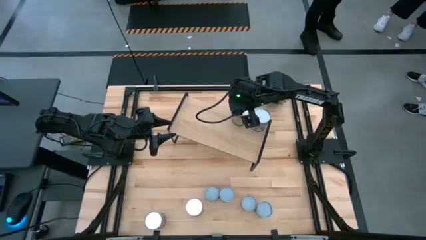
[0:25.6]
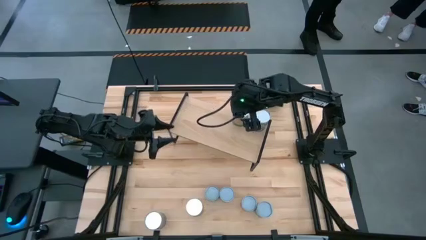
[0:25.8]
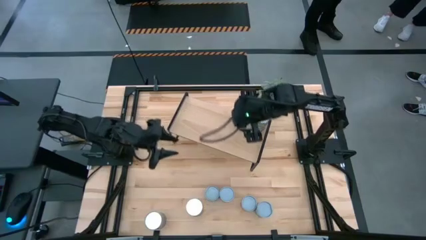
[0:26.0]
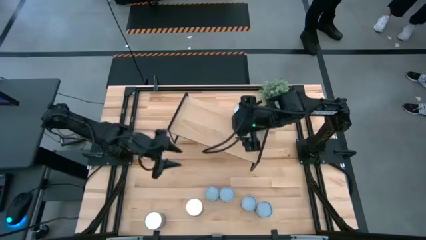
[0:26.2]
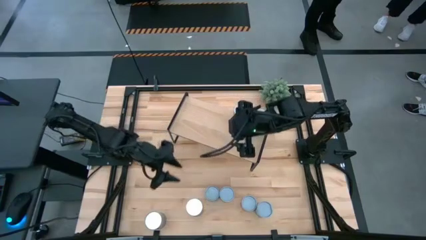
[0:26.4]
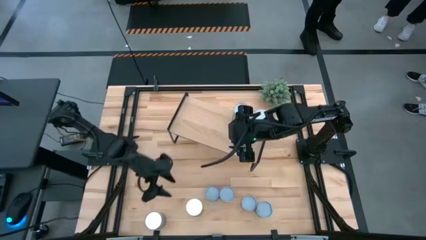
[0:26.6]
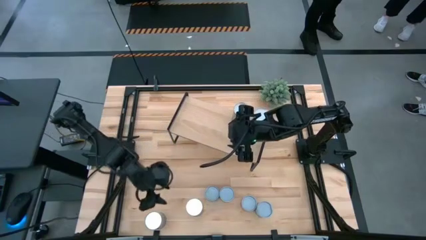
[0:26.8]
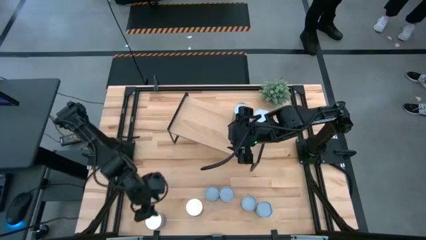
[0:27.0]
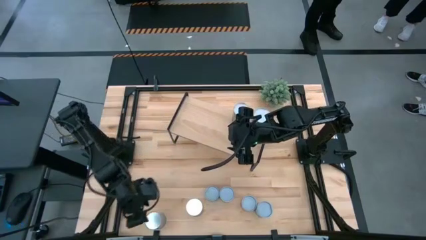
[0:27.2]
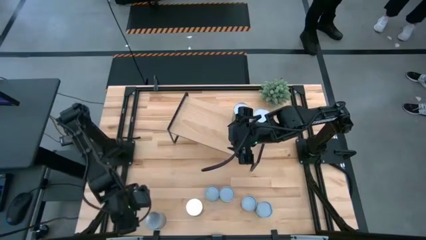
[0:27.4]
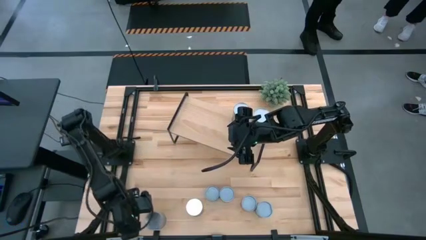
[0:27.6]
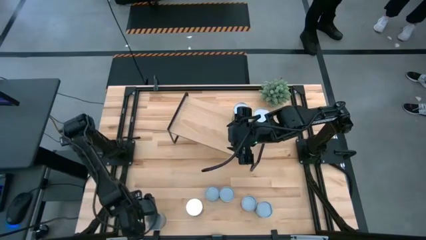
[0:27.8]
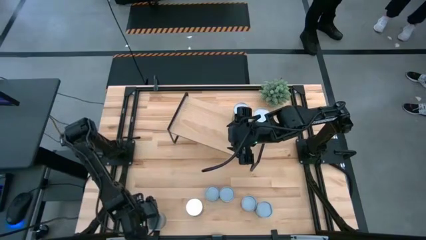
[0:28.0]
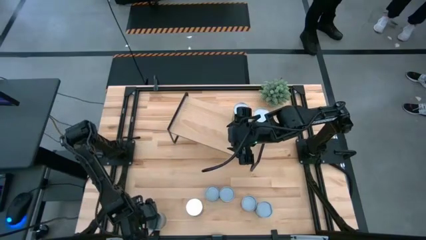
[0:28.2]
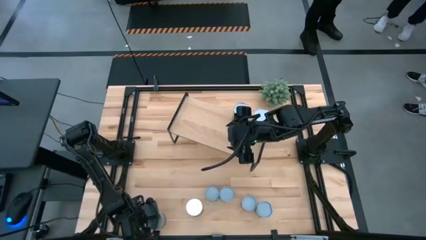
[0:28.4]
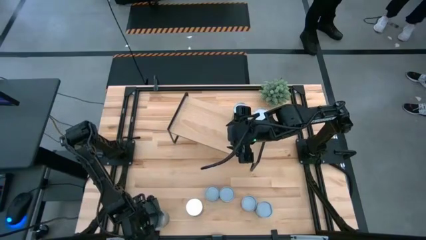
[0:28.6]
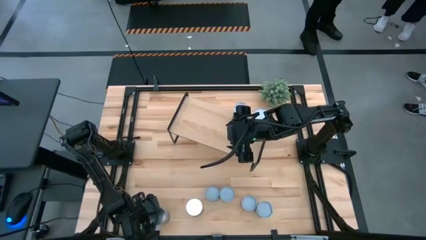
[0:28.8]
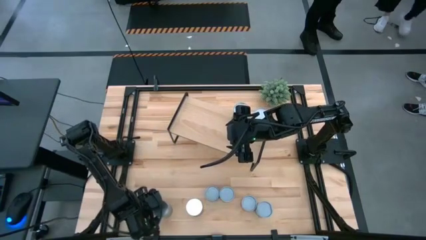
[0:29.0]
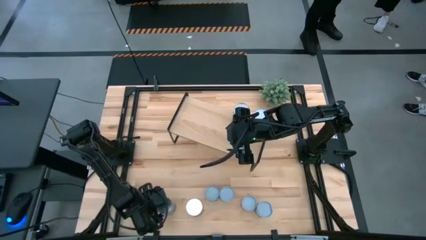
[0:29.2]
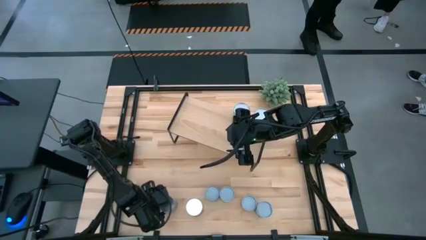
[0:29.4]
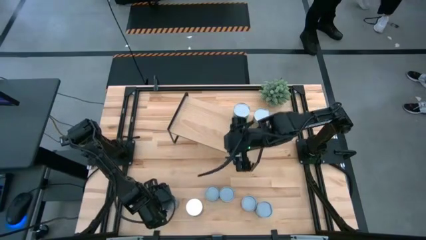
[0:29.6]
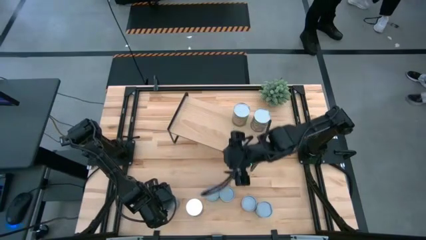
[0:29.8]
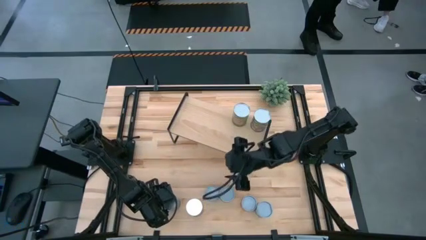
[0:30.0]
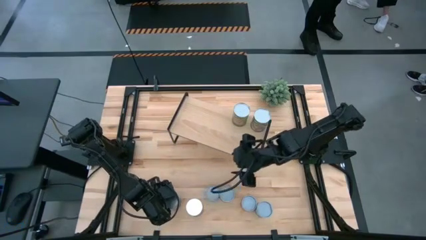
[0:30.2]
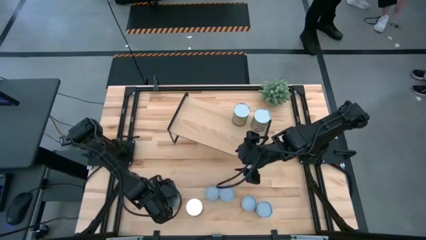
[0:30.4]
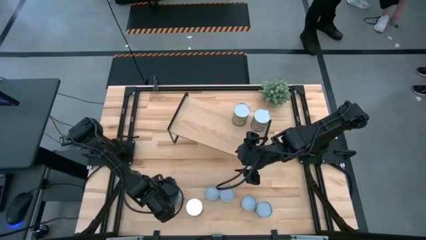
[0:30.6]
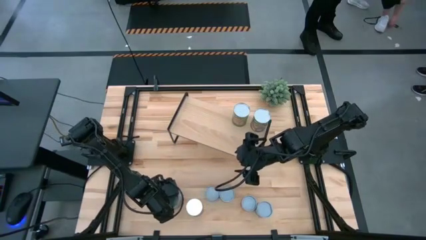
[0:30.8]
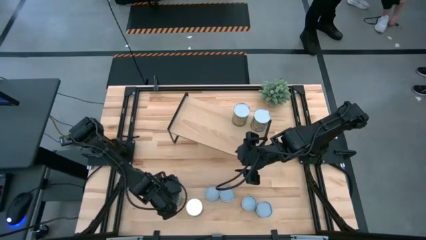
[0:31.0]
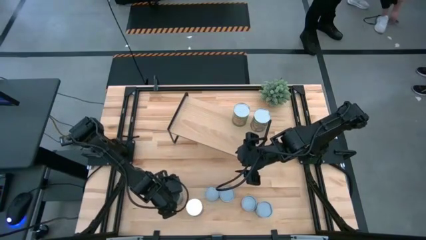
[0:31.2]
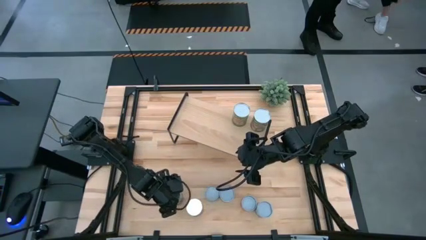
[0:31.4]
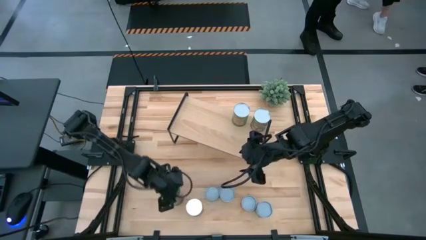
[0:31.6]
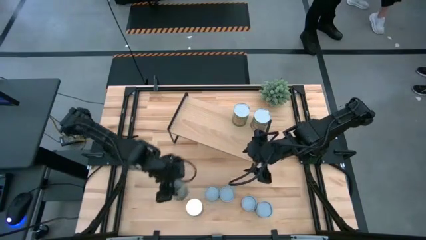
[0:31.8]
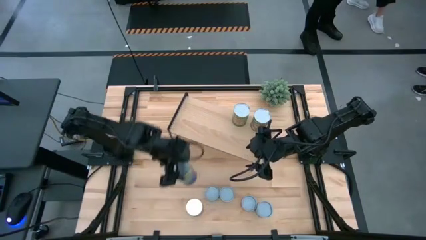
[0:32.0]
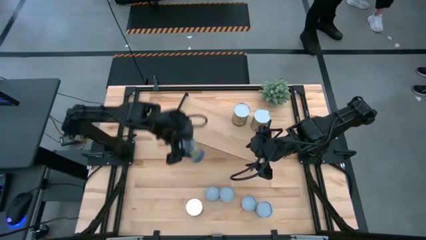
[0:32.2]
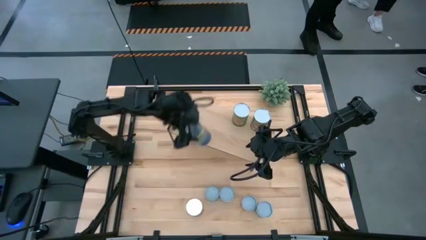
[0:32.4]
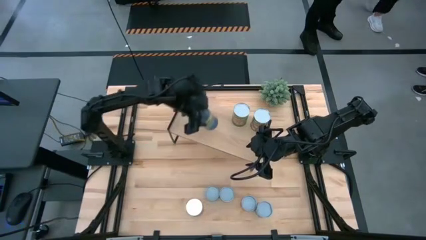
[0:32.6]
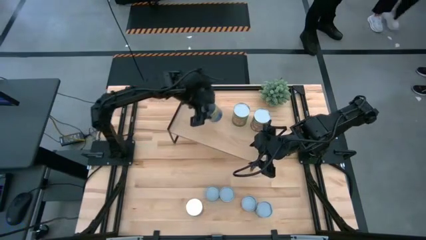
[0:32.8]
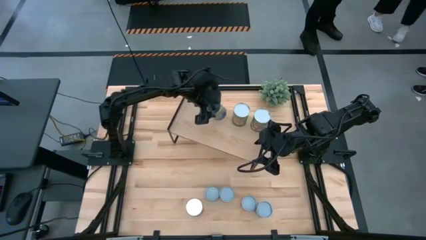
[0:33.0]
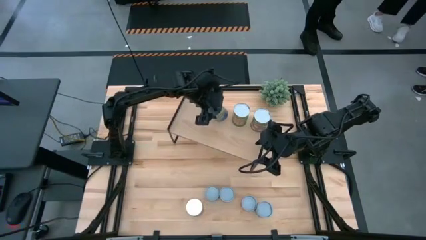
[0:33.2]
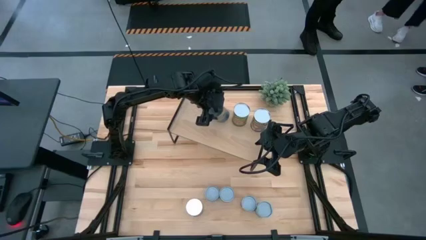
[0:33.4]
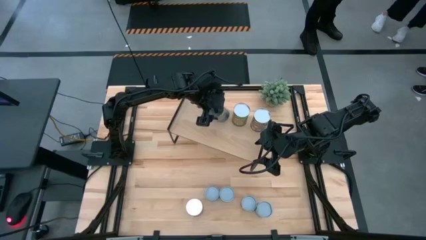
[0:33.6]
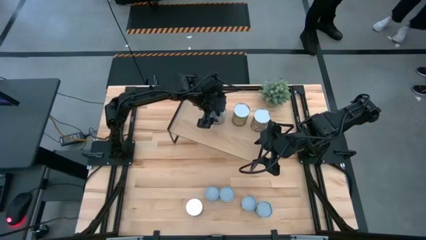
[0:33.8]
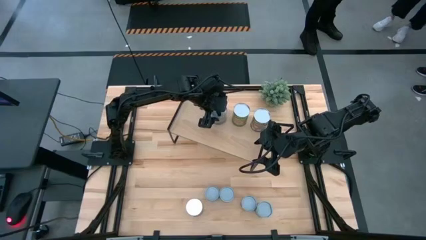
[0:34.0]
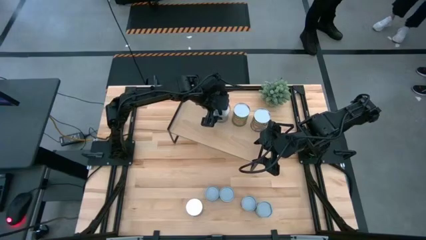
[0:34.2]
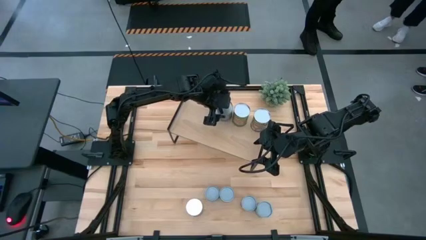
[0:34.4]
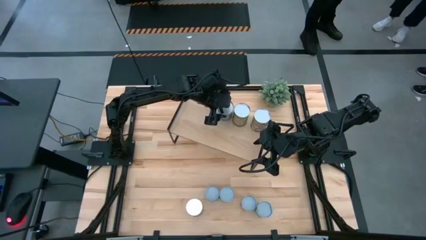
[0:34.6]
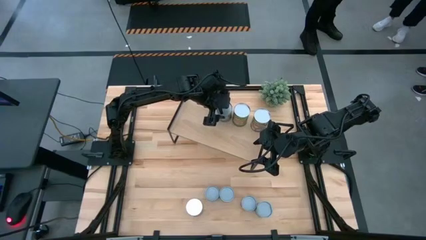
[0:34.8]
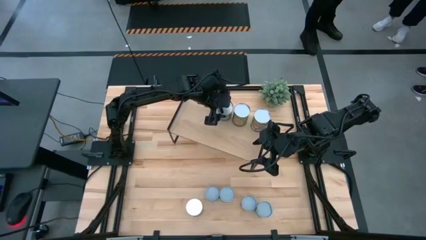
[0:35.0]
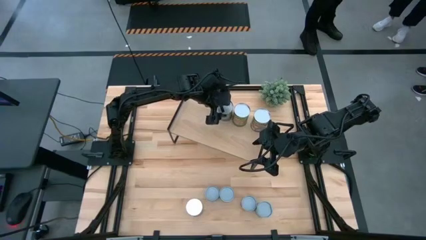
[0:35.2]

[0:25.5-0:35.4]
Task: Pick and place cans onto a shelf
Put the canned peas on the shelf

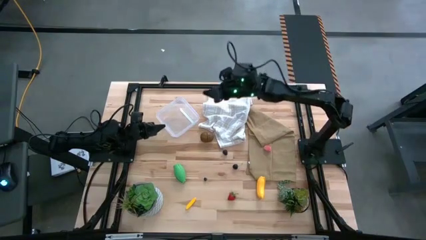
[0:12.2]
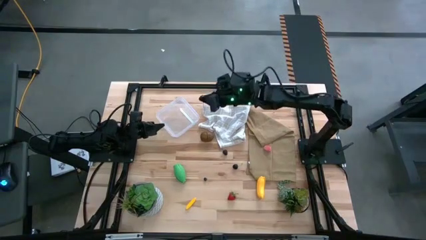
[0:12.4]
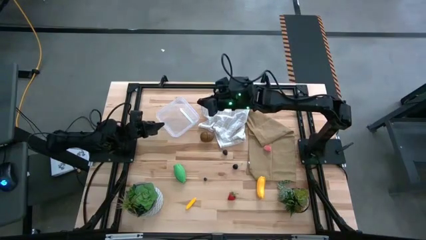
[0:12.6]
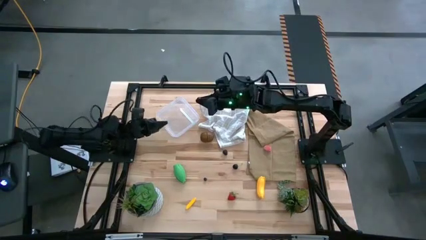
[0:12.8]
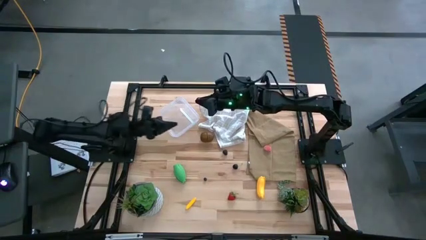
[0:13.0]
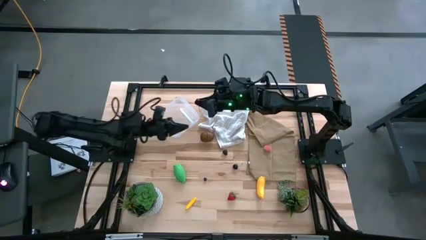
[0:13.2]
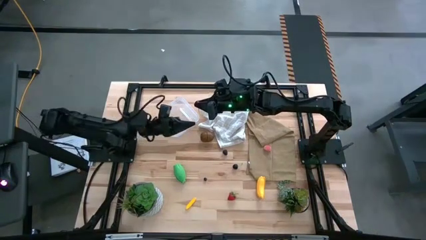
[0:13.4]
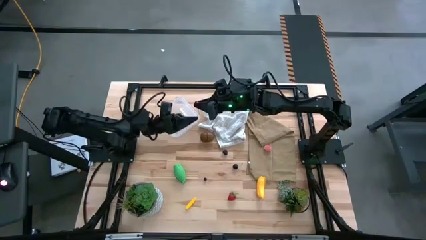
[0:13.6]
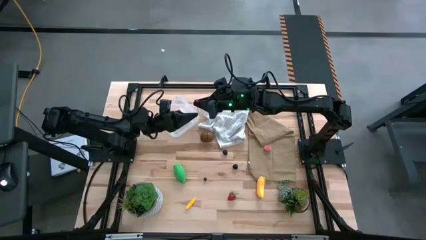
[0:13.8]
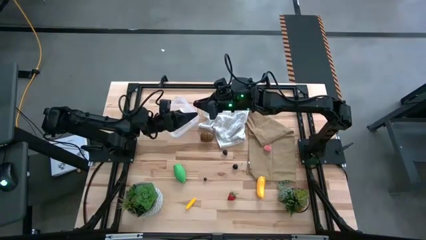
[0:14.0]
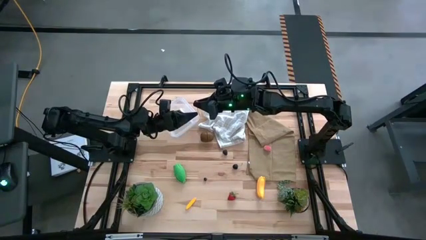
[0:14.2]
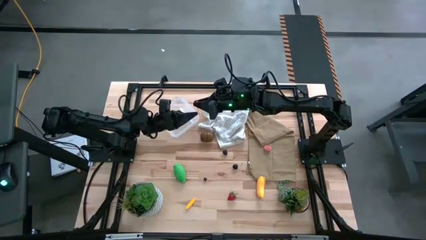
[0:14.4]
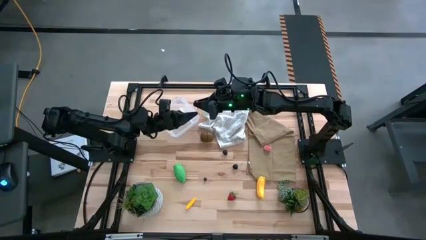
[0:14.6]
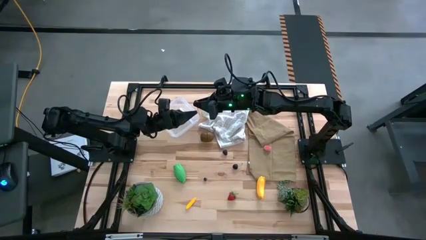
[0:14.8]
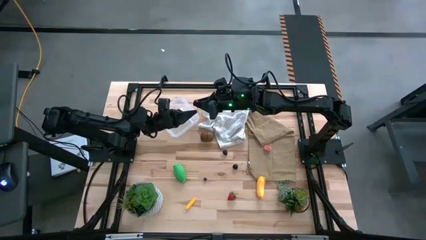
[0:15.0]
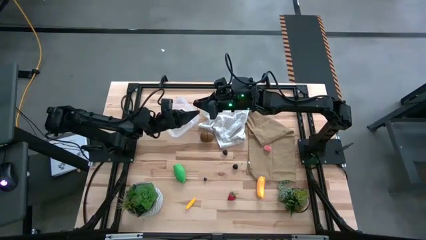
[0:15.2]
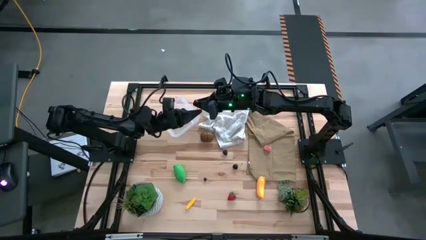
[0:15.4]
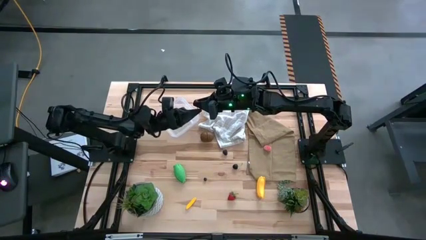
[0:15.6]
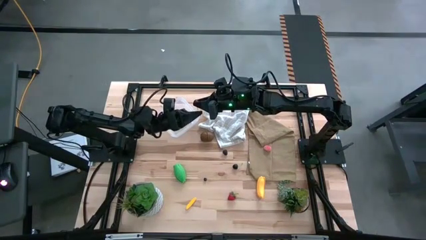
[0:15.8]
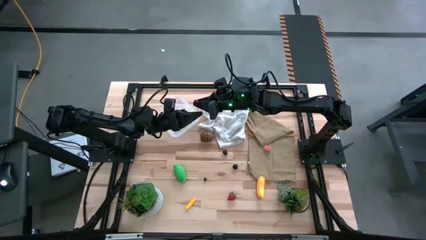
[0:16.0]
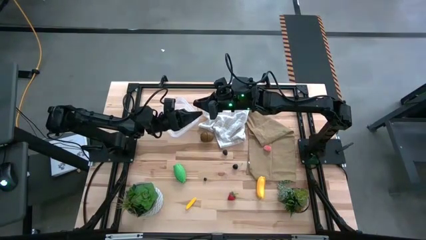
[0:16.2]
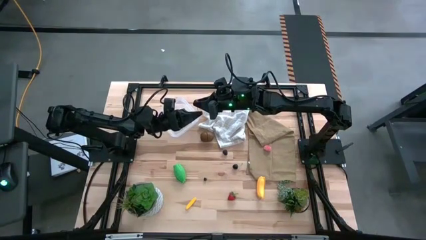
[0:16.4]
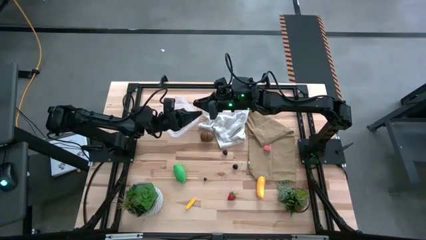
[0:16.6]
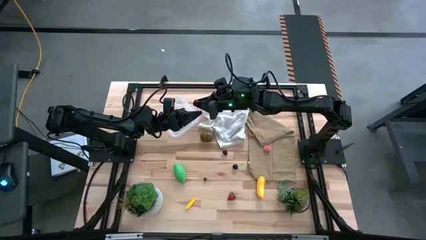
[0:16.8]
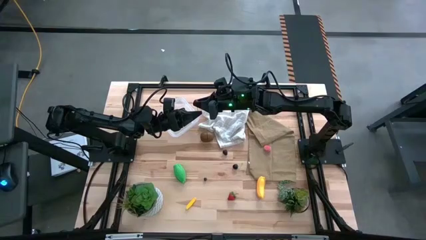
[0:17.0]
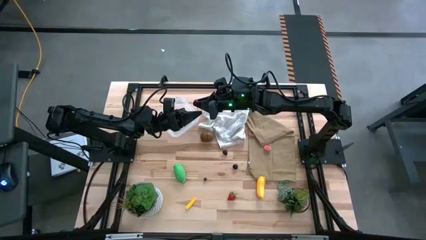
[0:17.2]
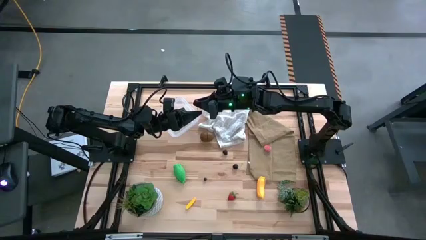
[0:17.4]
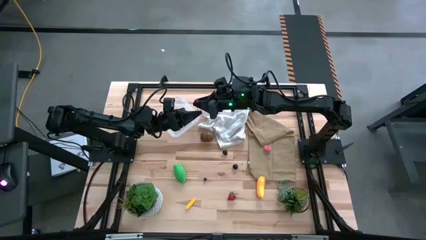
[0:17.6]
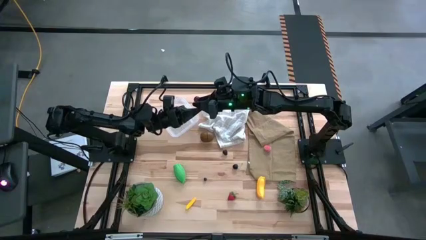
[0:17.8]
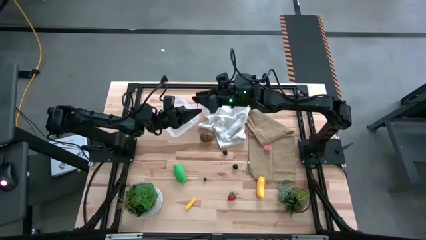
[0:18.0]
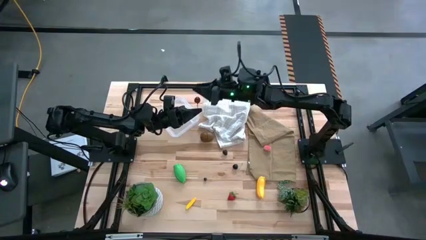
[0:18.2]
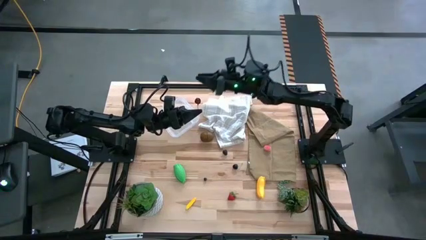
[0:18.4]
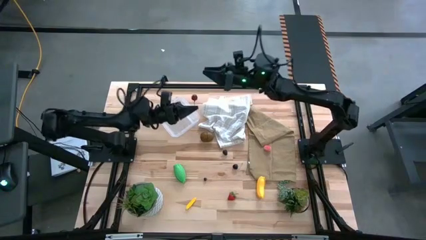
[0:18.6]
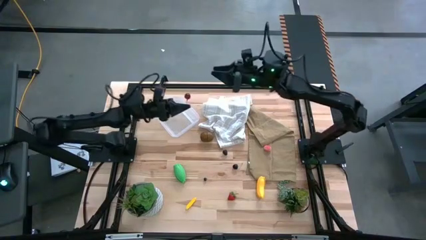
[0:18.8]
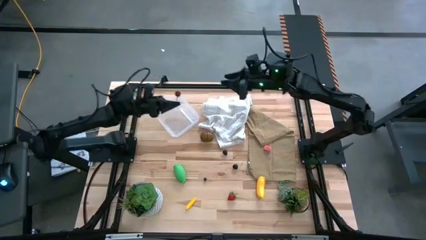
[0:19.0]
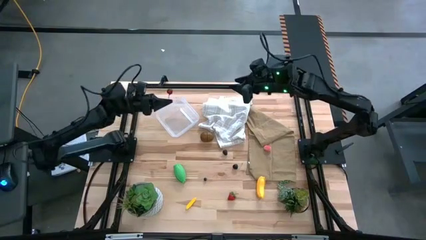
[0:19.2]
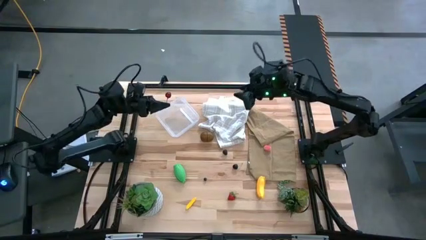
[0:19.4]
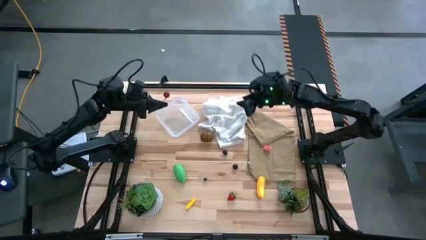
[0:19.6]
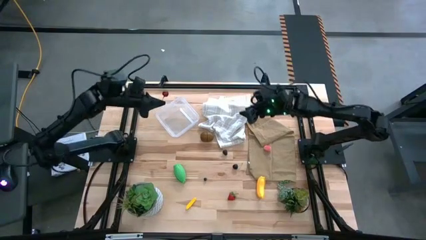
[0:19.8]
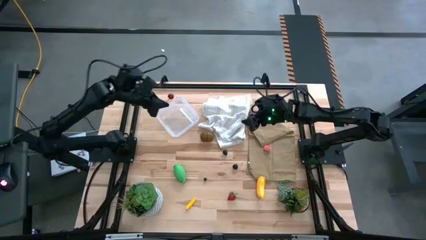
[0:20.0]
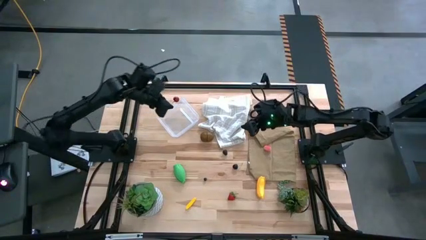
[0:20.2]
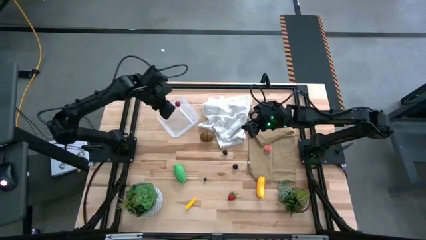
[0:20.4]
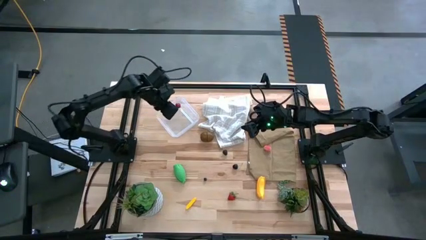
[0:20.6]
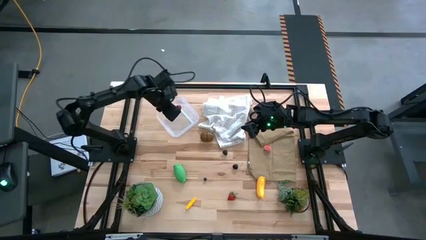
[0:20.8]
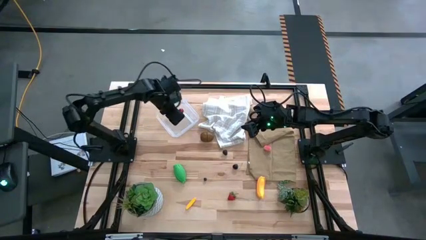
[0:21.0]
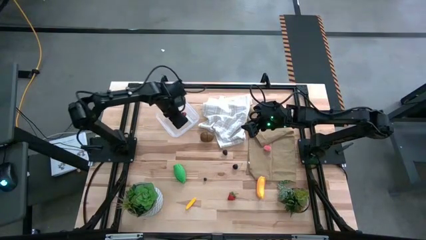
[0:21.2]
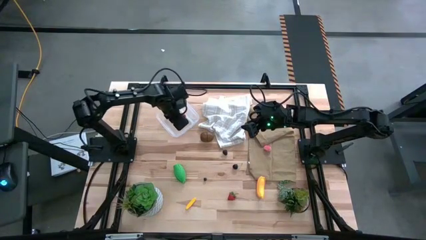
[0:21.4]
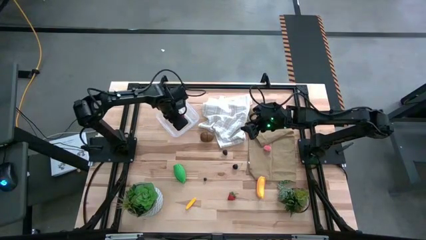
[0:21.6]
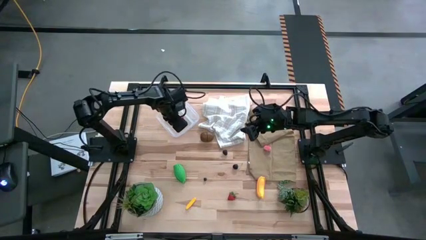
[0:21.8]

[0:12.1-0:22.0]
Task: Pick and placing Produce into tupperware
Put the red cherry into the transparent bin
